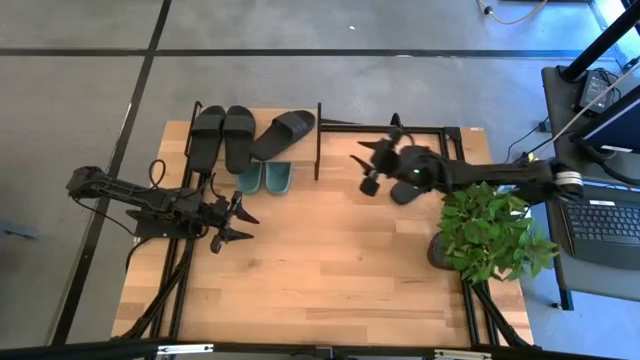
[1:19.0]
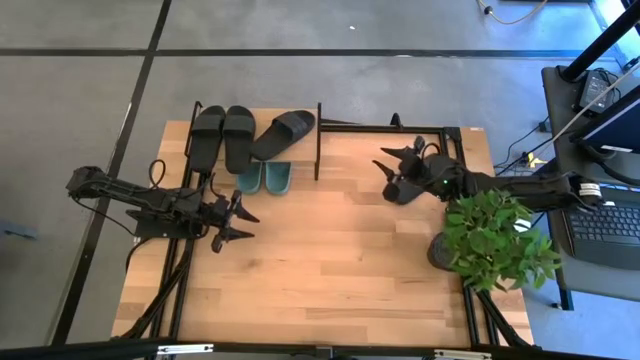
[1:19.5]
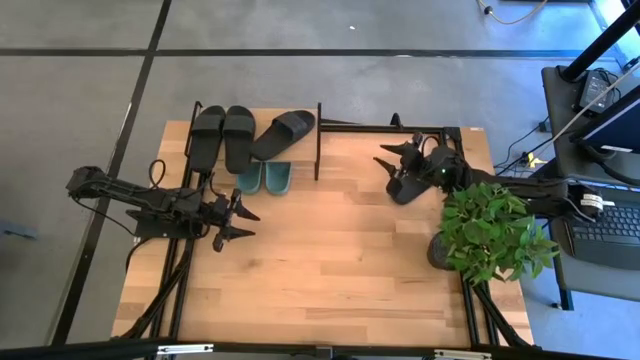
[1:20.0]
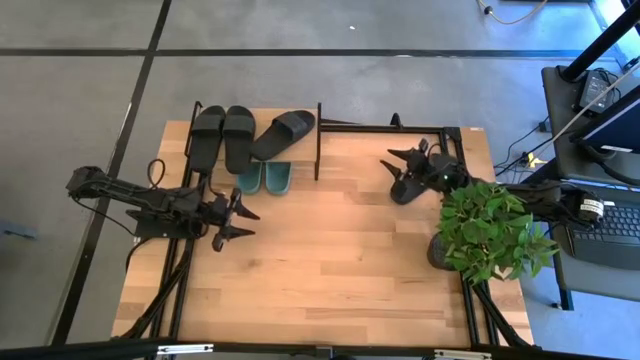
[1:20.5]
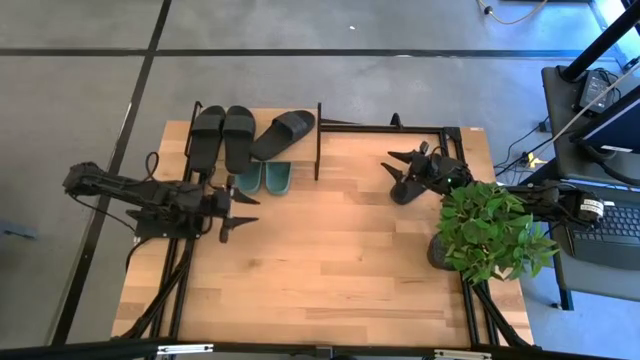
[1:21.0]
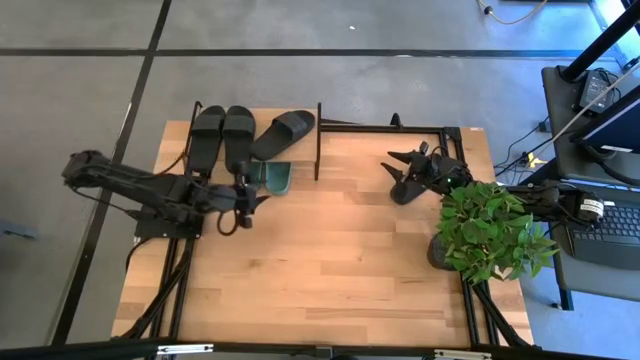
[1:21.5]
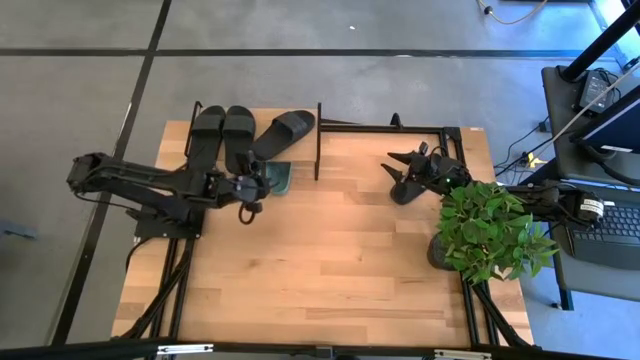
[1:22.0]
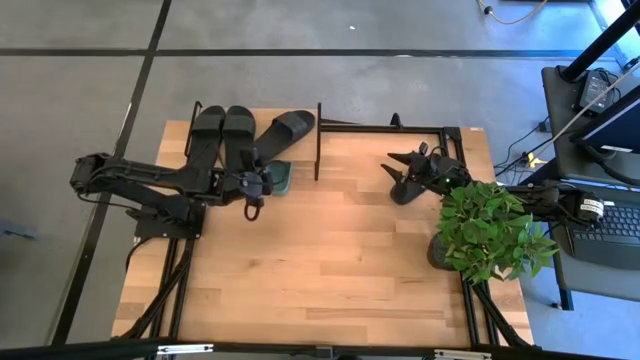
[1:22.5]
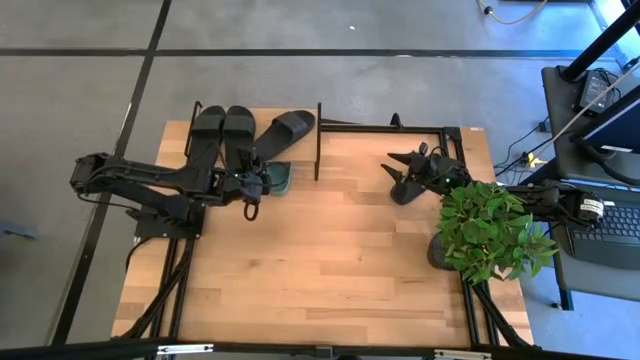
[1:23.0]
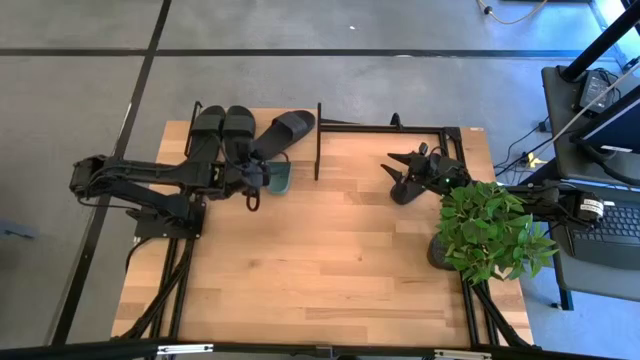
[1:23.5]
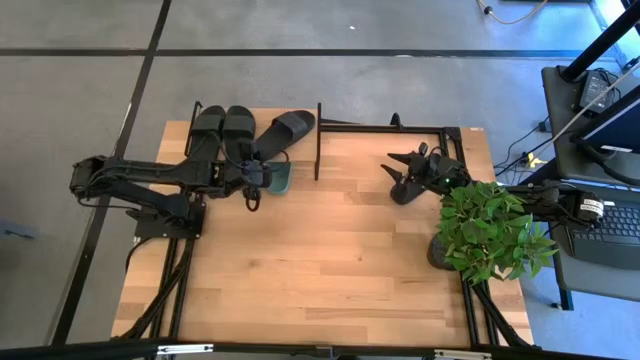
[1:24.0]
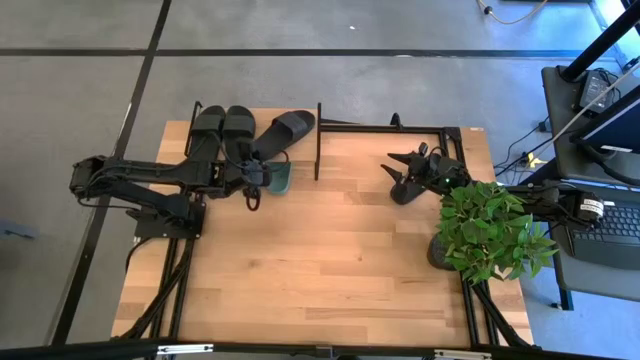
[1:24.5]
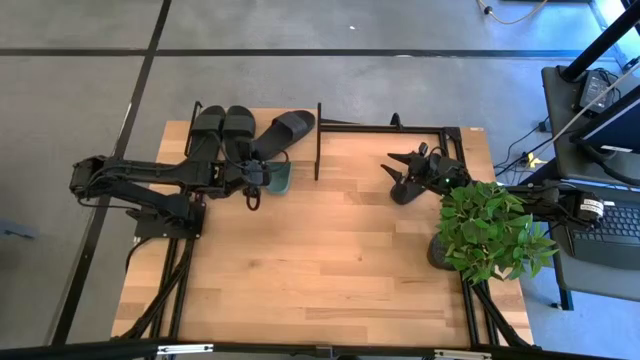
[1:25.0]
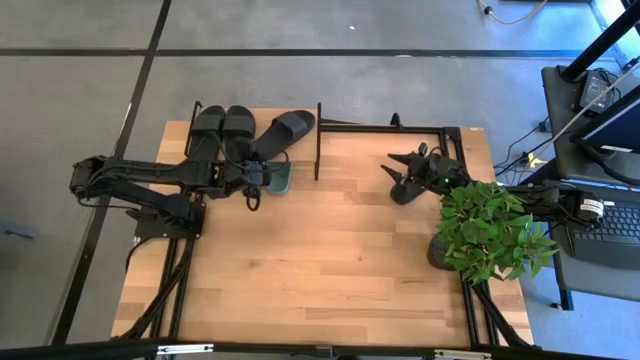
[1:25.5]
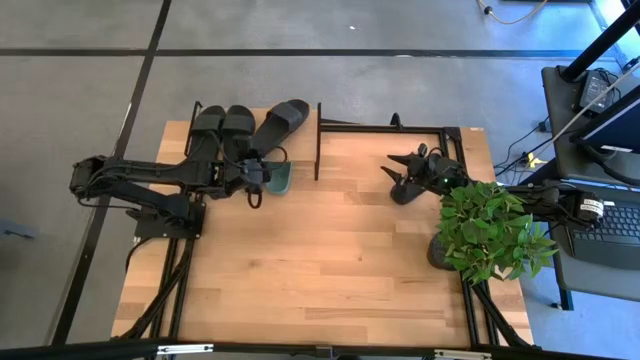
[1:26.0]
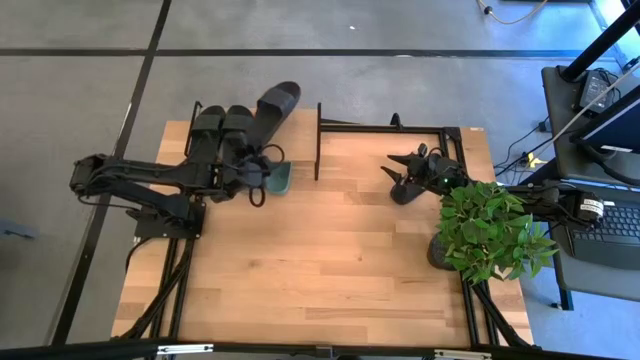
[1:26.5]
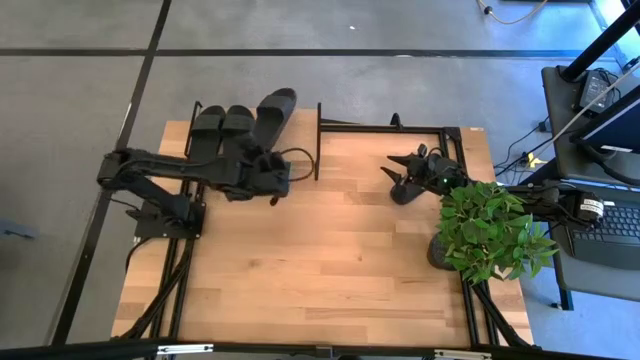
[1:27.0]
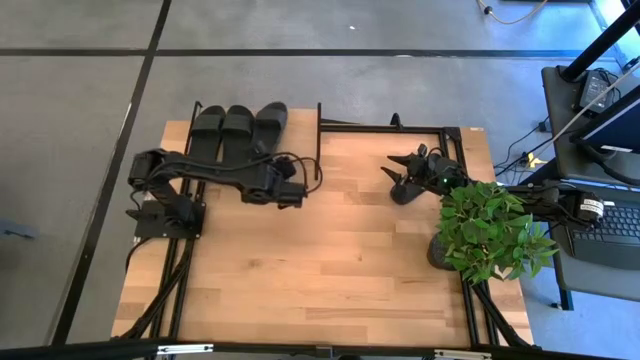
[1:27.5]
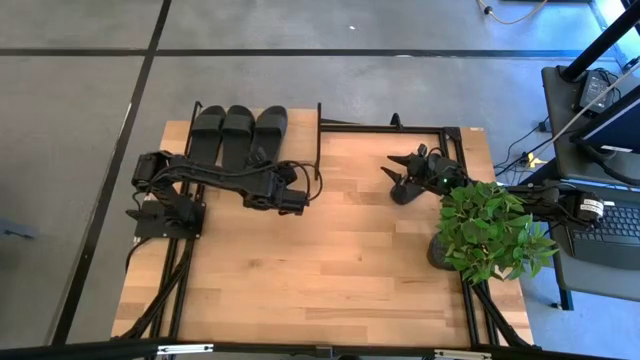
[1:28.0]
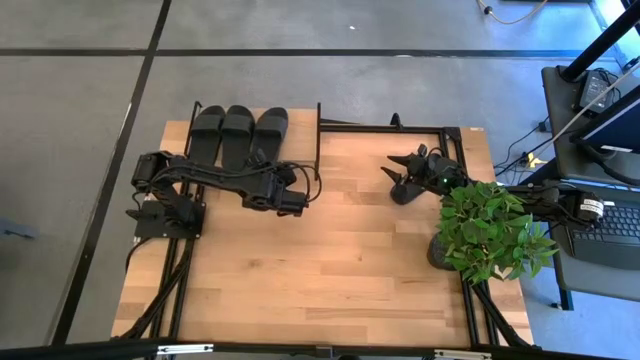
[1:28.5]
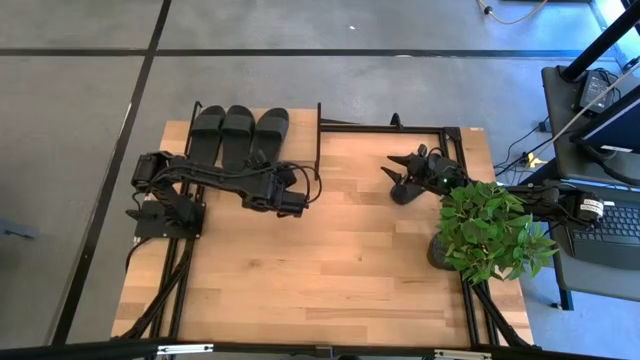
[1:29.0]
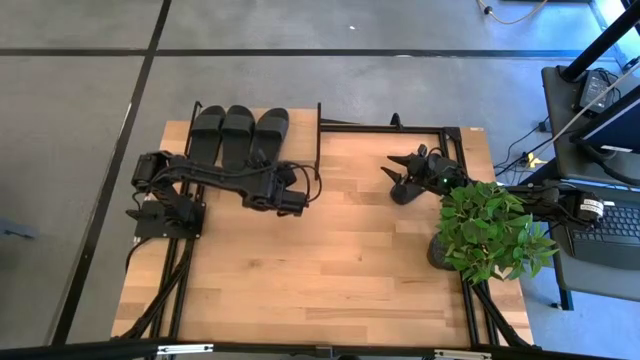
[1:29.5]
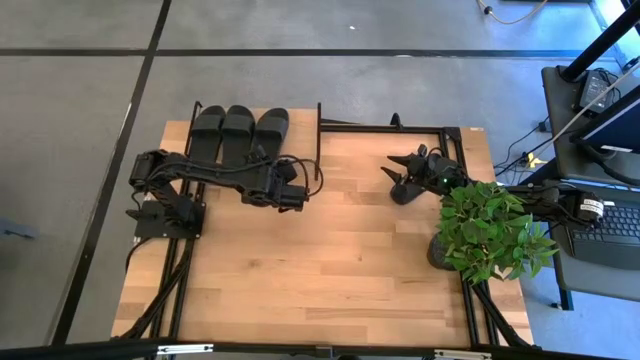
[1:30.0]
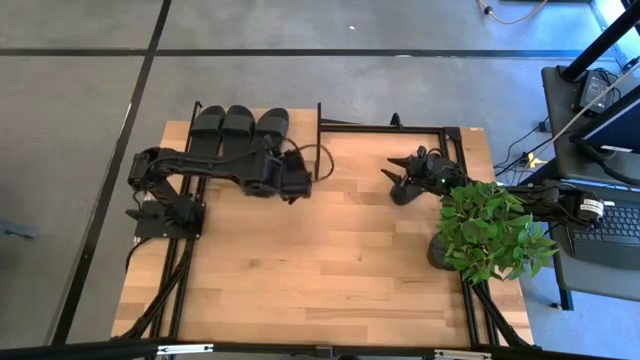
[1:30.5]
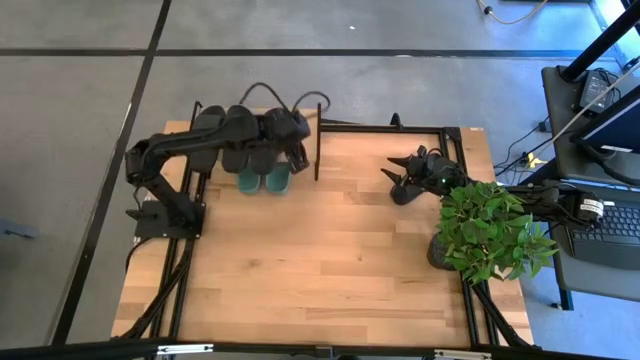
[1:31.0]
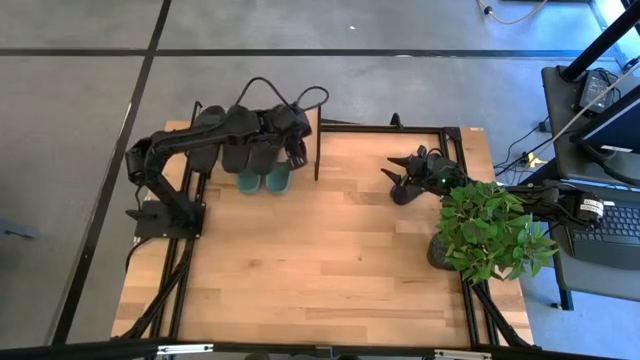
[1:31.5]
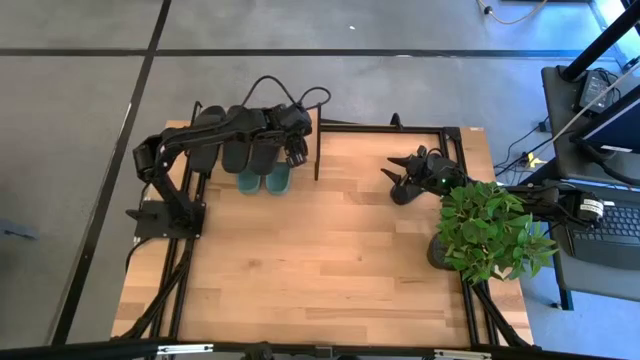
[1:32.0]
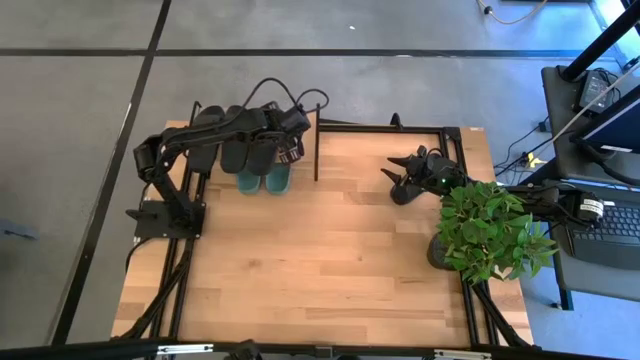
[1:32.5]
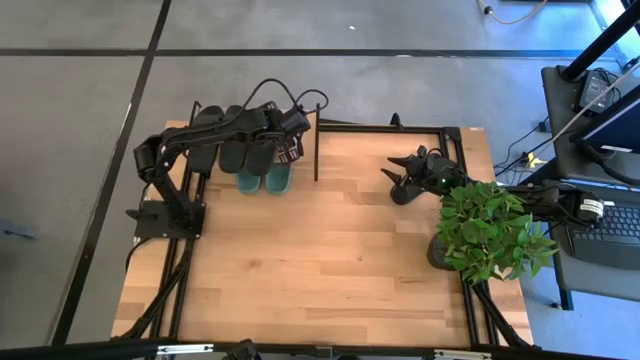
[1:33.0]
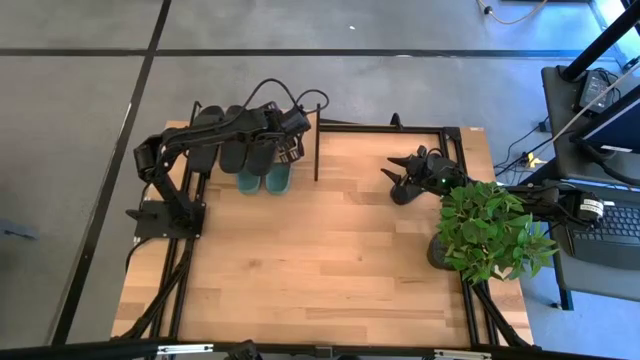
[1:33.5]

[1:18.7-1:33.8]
Task: Pick and place slides into the shelf
Put the black slipper on the shelf

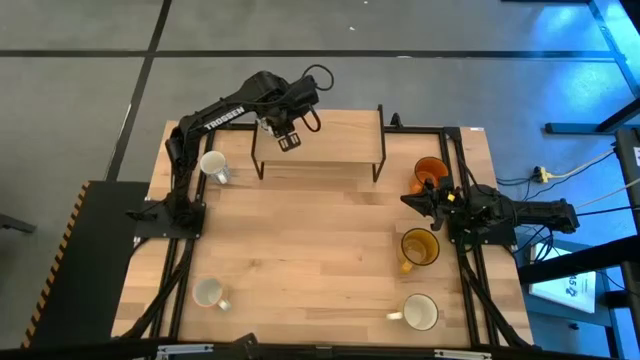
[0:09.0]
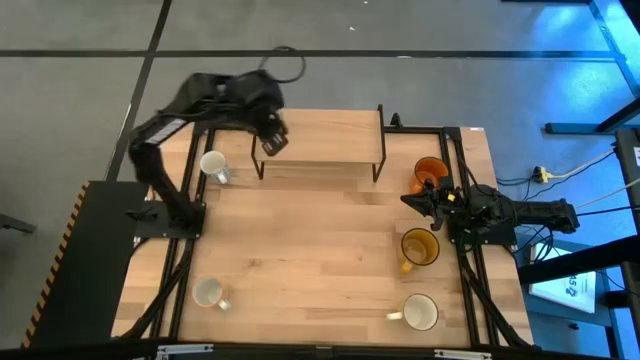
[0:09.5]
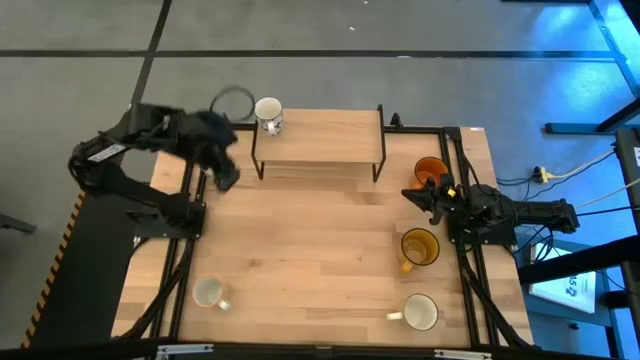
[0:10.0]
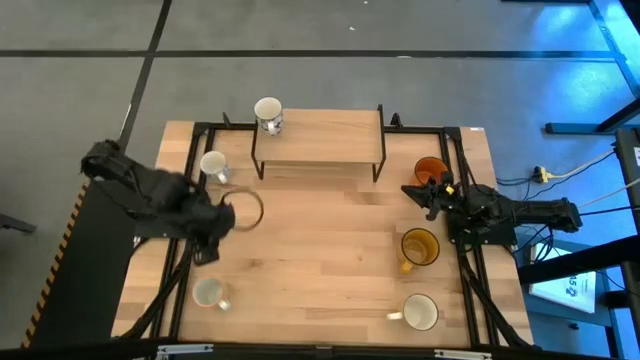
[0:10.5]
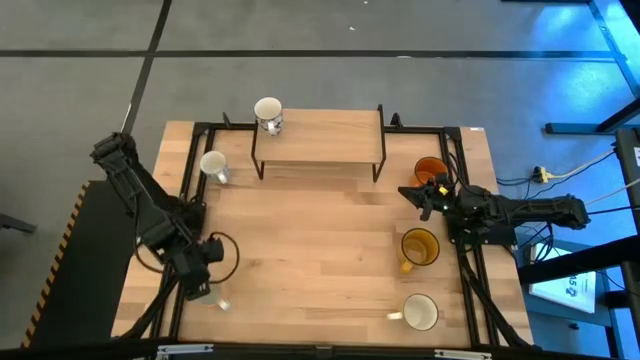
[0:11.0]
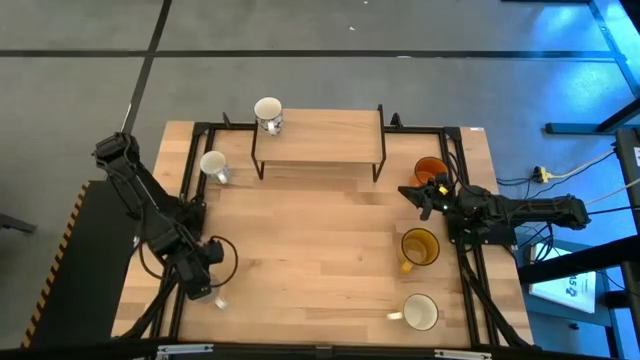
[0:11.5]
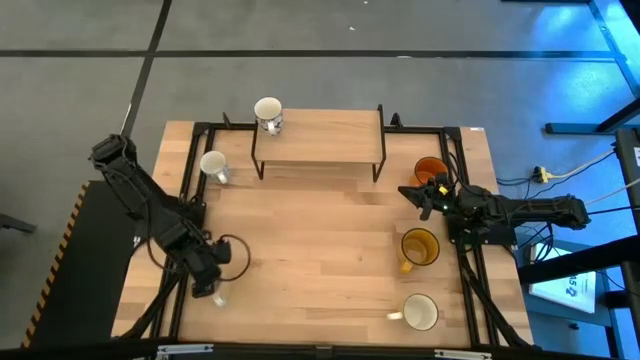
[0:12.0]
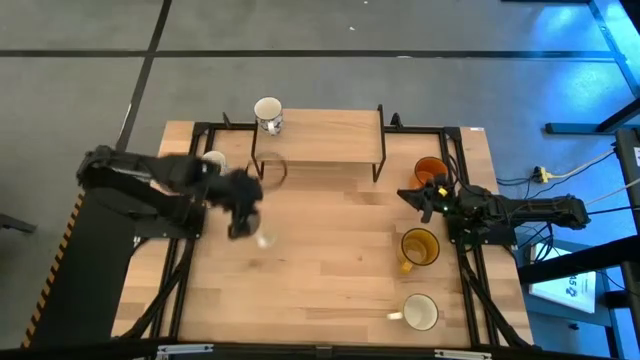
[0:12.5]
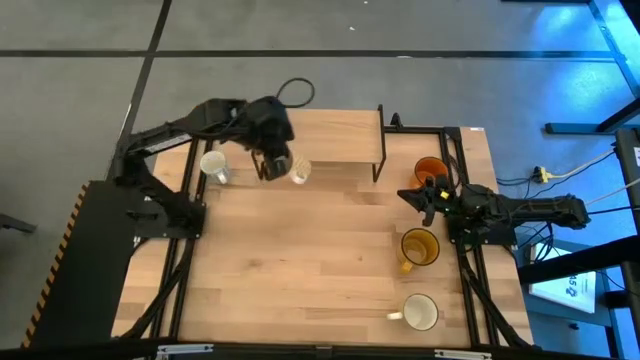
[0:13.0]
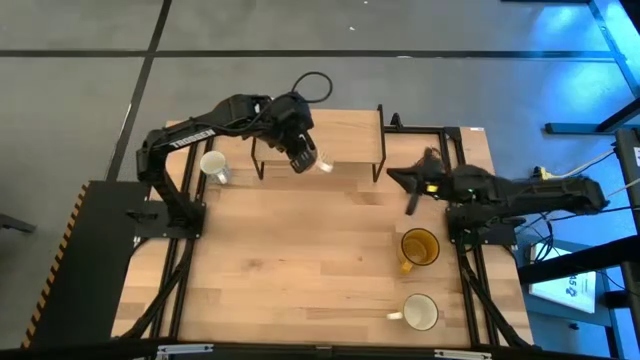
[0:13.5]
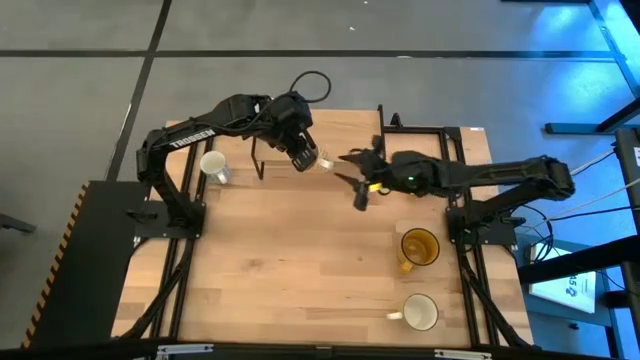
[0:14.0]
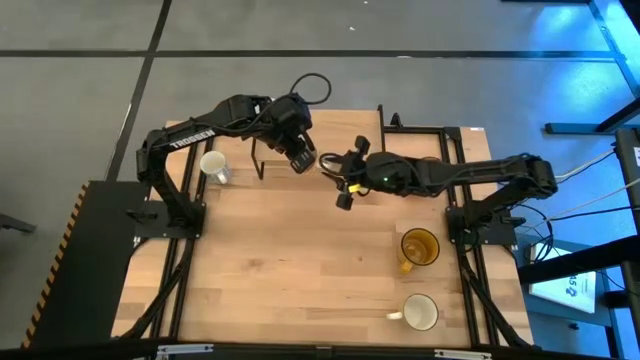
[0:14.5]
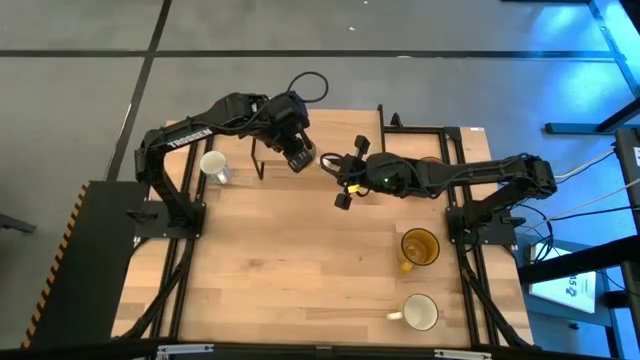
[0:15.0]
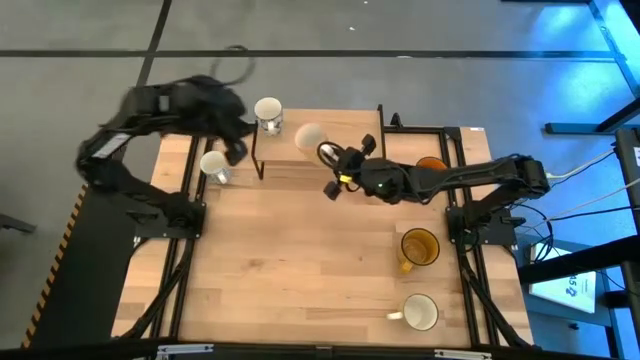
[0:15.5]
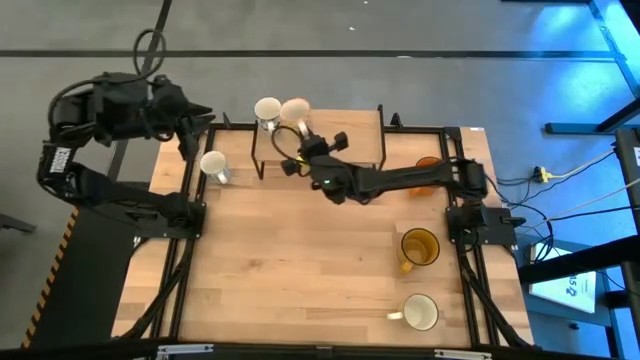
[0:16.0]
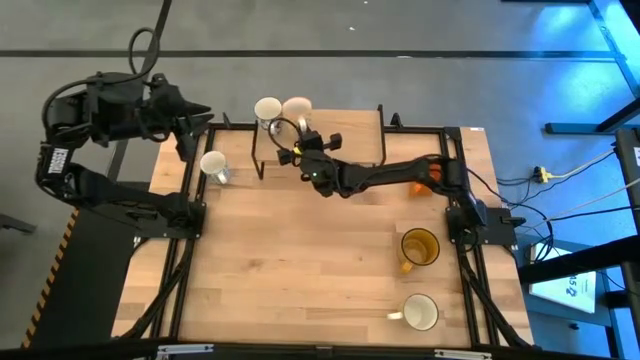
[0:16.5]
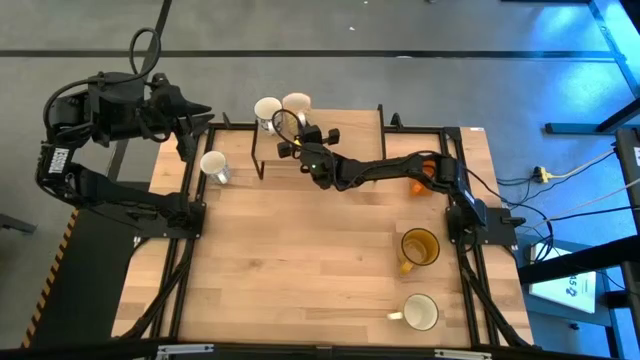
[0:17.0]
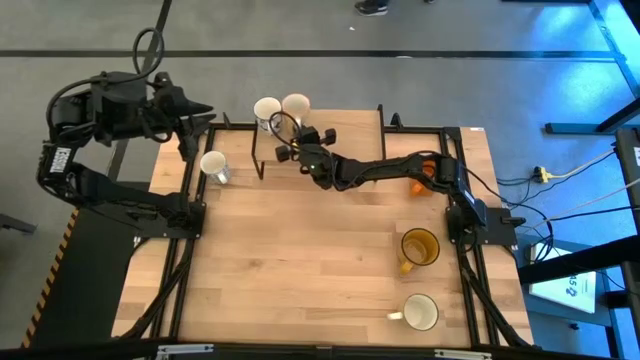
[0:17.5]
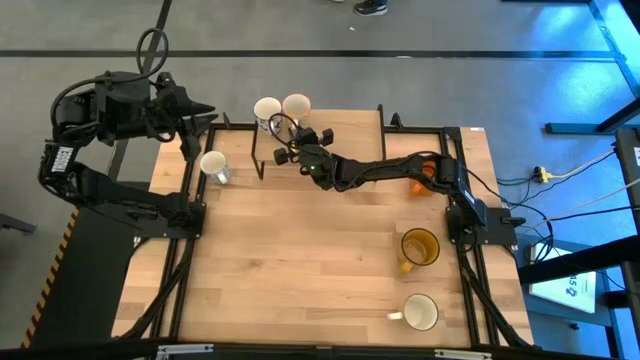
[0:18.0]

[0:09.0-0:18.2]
Task: Place coffee mugs
Put the yellow patterned mug on the shelf
